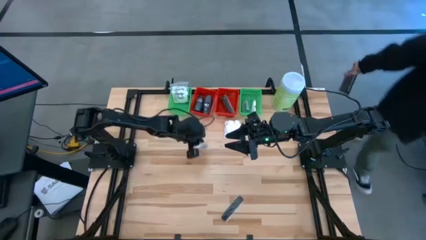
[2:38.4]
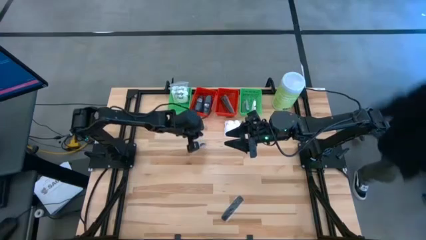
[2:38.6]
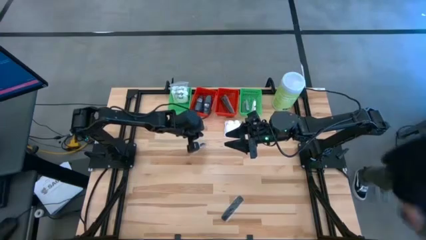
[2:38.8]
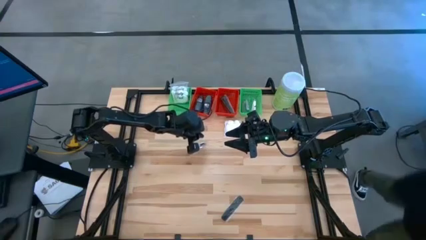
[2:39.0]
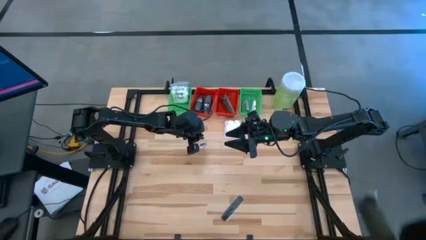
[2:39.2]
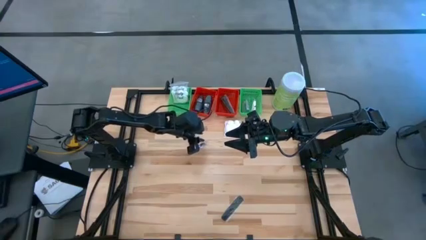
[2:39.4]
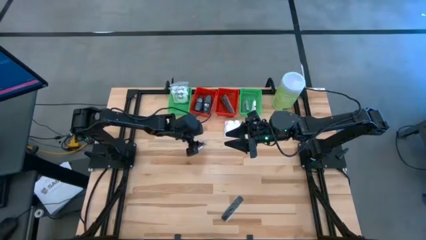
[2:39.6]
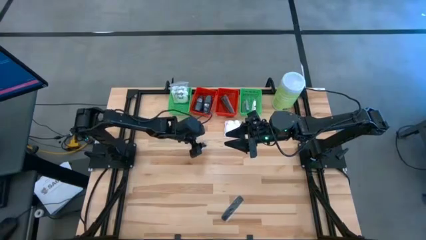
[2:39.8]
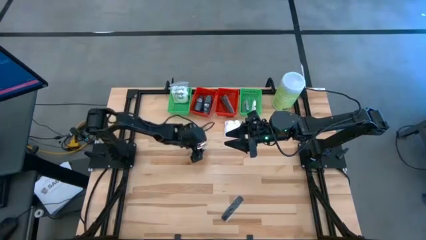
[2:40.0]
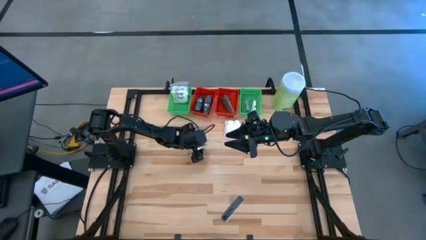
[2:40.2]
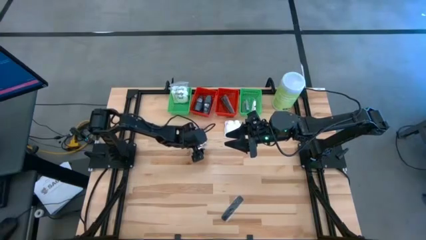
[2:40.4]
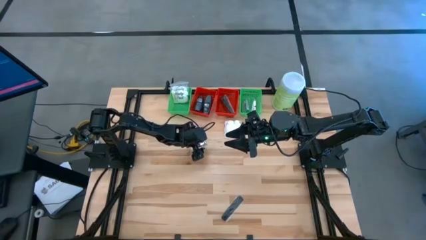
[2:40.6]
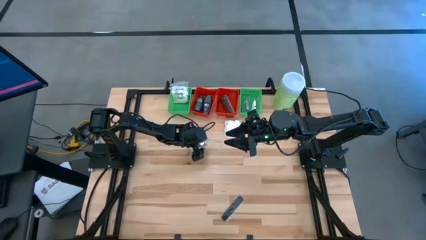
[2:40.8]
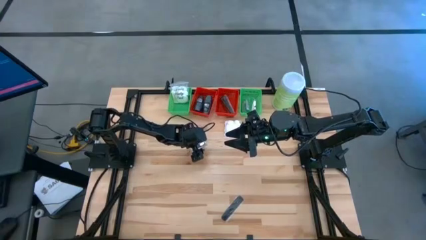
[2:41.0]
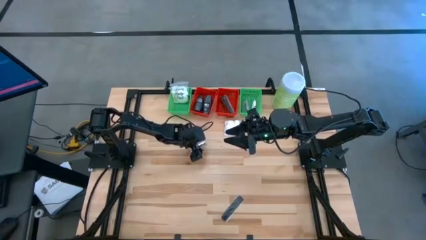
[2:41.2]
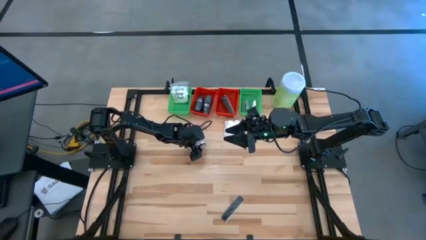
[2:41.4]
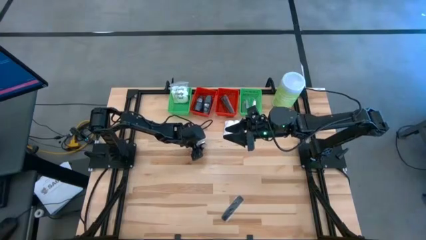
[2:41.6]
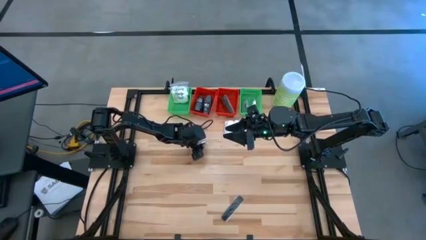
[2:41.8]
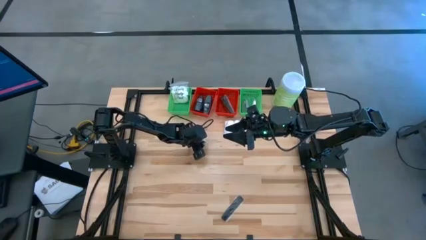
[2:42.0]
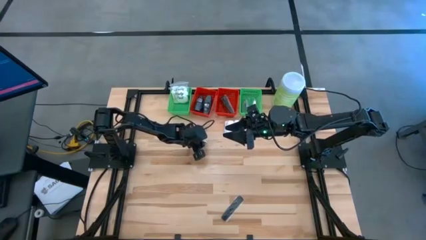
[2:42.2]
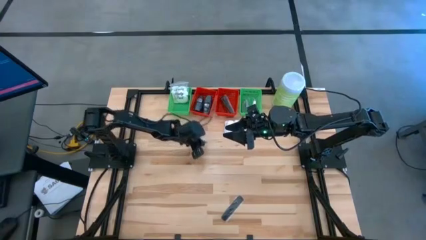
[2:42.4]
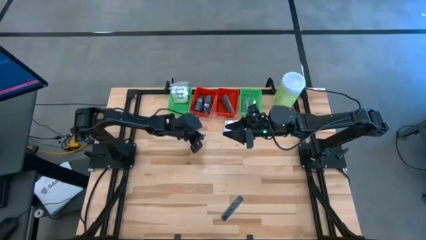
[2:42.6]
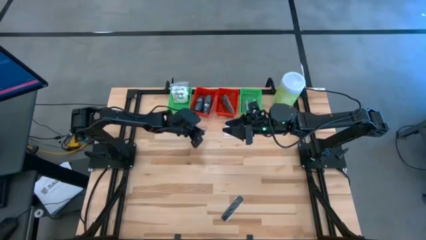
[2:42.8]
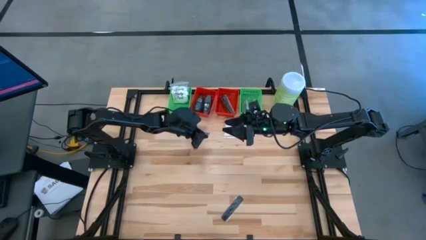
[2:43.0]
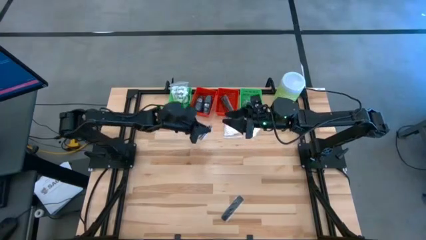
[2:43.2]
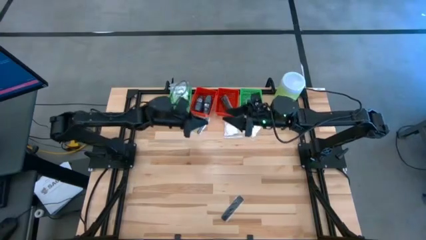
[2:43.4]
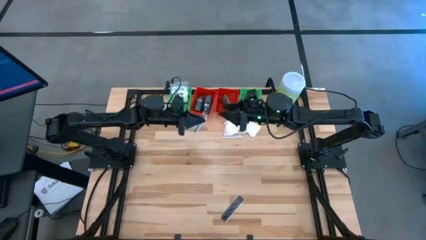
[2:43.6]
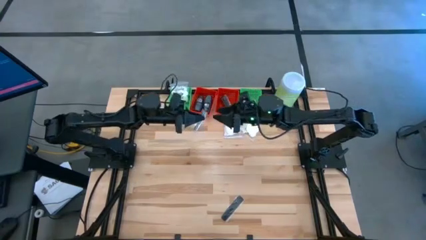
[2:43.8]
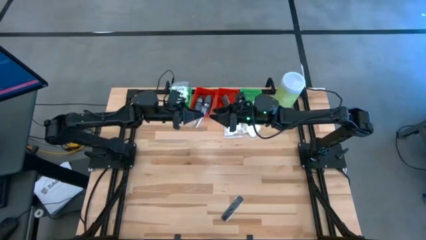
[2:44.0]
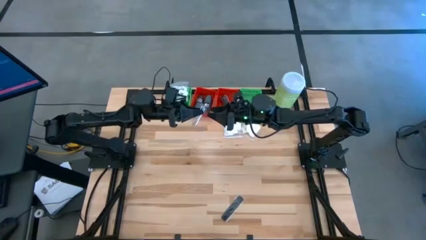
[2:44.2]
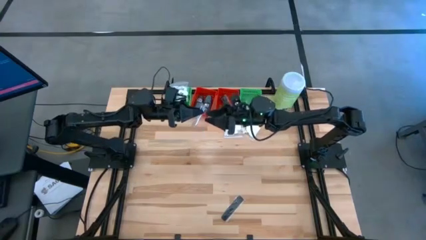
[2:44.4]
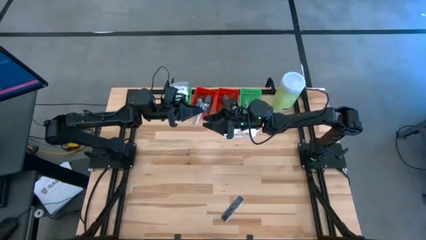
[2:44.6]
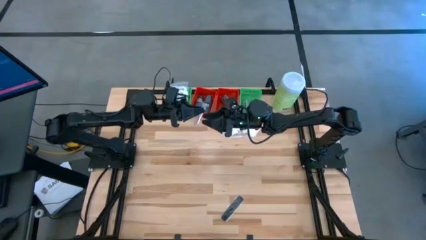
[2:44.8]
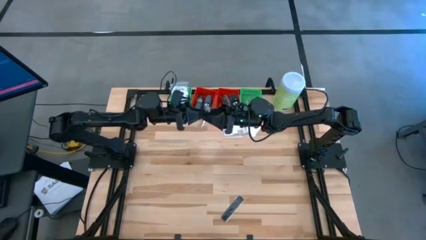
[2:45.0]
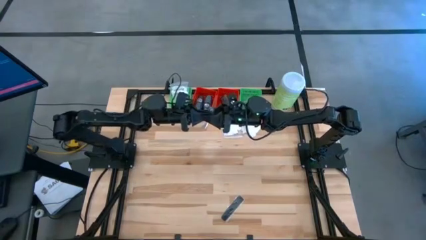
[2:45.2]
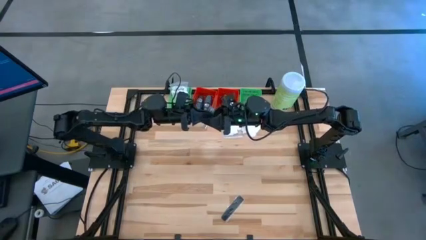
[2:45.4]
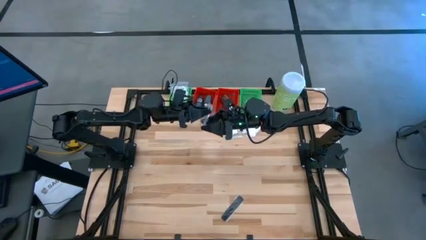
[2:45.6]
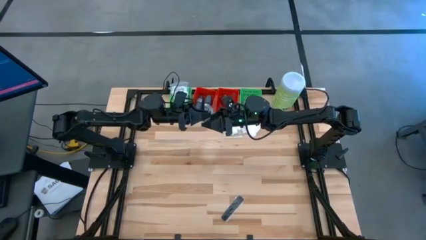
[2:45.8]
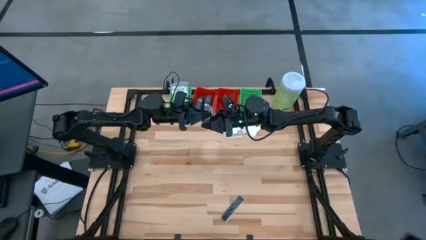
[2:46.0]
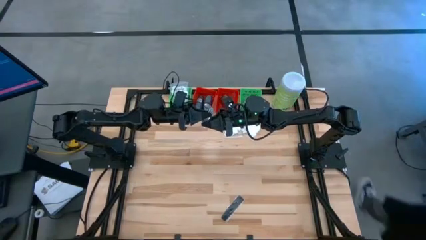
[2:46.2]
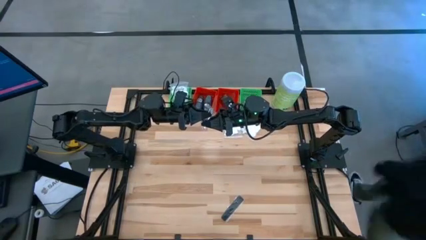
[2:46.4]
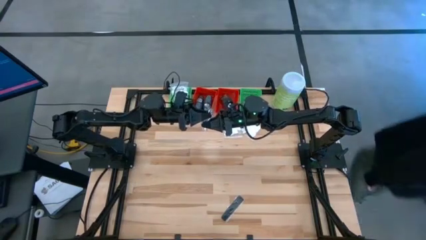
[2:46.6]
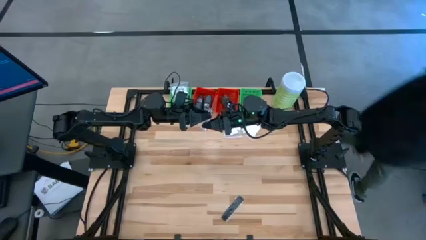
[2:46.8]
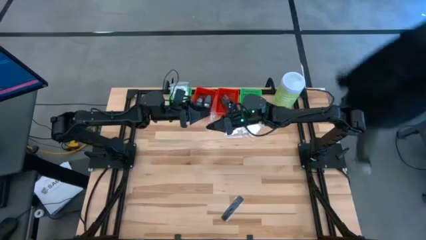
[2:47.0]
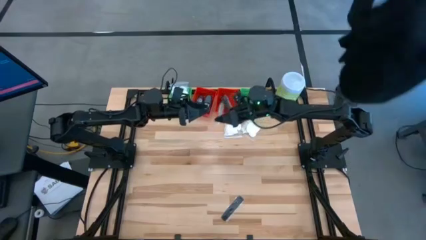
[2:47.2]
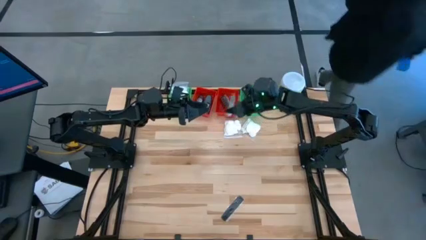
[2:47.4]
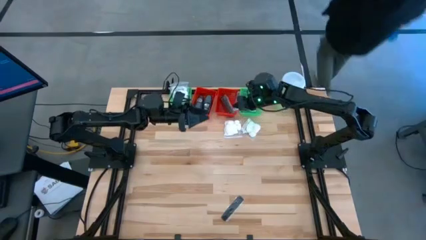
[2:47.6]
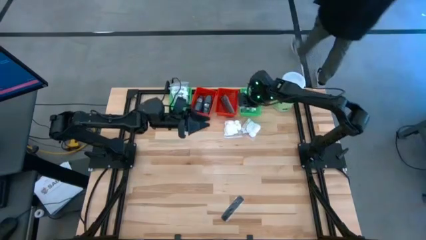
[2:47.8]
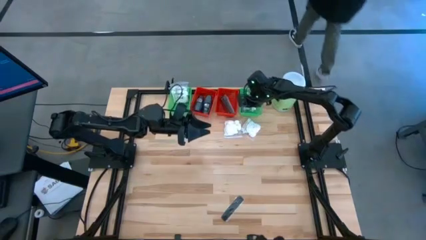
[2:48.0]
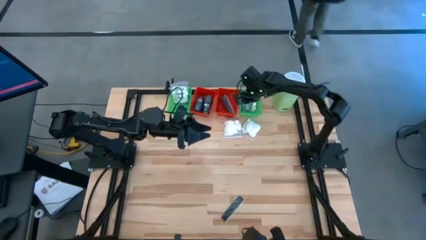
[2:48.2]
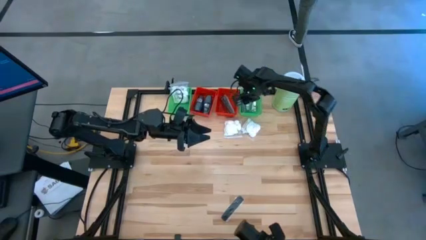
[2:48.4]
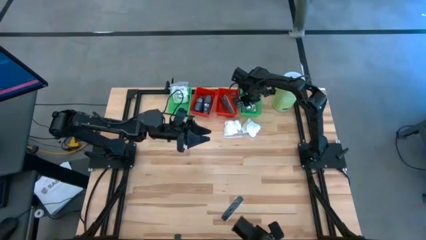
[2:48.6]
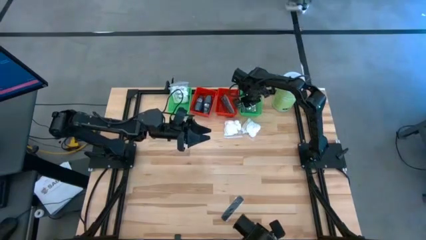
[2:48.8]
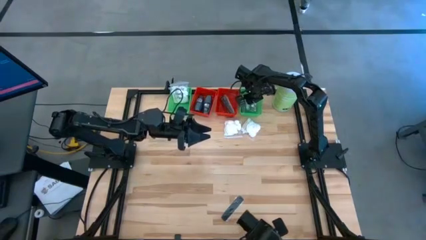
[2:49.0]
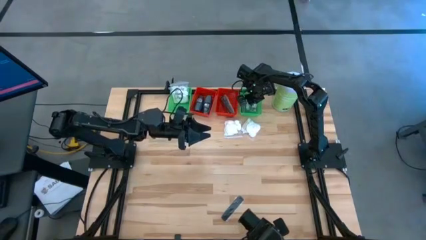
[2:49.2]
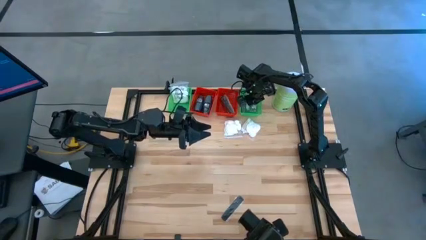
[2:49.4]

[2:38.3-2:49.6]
Task: Pick & Place Travel size toiletries
Put the nail cutter into the right green basket

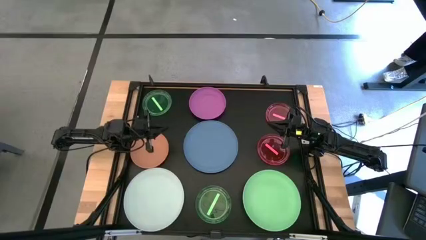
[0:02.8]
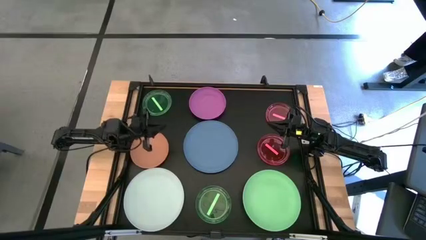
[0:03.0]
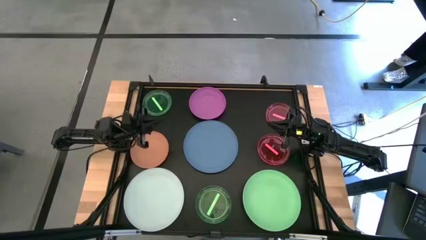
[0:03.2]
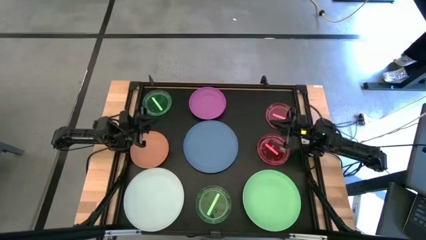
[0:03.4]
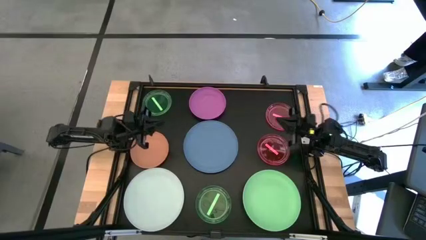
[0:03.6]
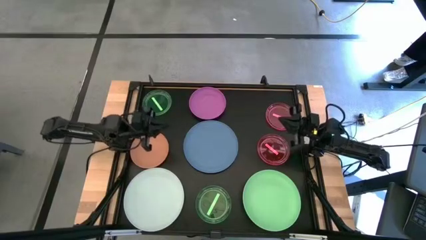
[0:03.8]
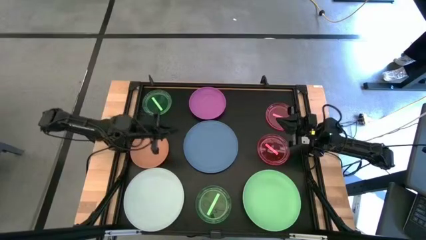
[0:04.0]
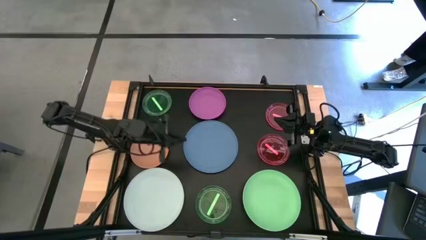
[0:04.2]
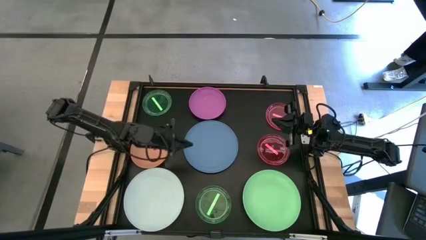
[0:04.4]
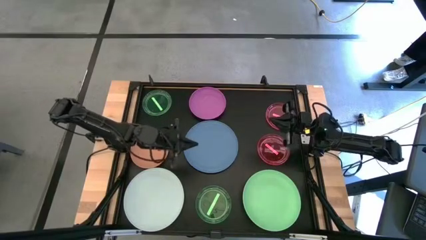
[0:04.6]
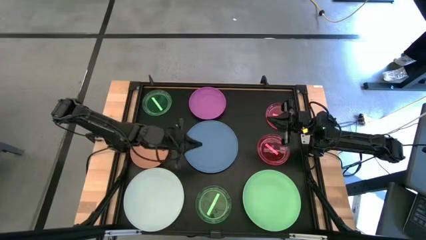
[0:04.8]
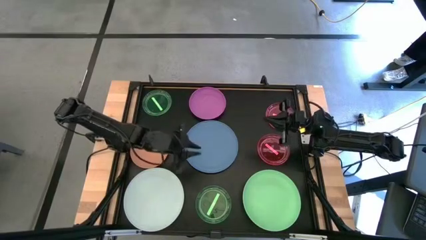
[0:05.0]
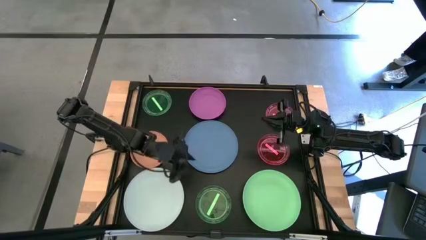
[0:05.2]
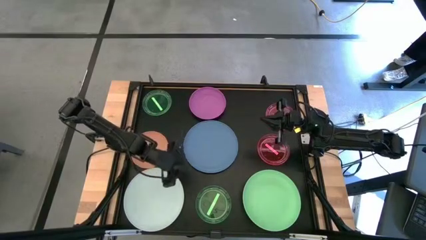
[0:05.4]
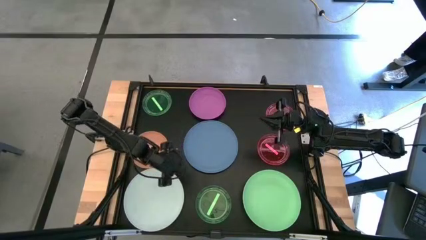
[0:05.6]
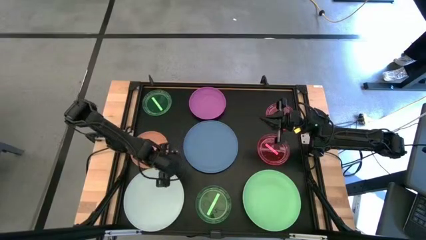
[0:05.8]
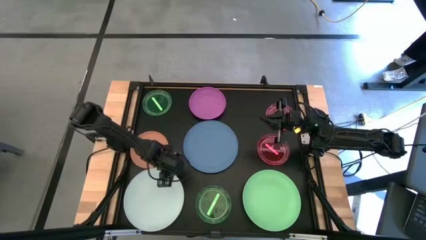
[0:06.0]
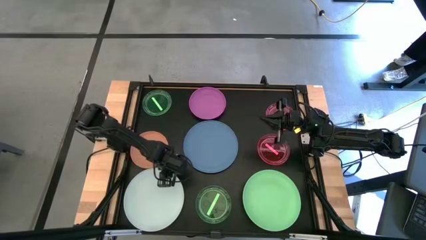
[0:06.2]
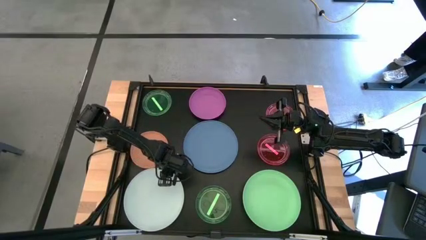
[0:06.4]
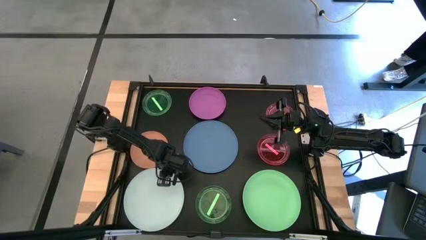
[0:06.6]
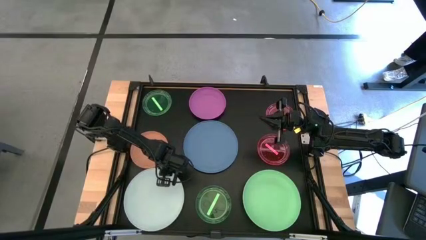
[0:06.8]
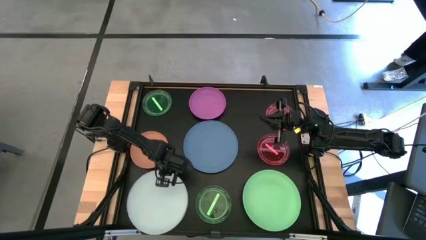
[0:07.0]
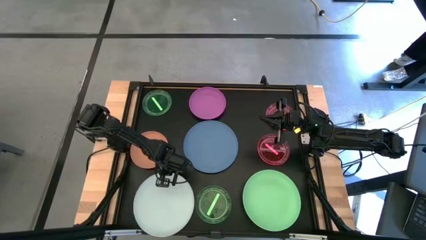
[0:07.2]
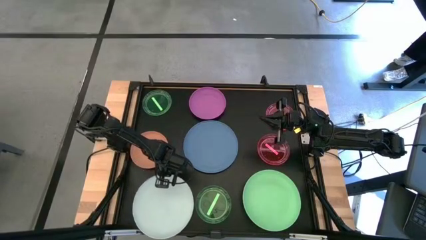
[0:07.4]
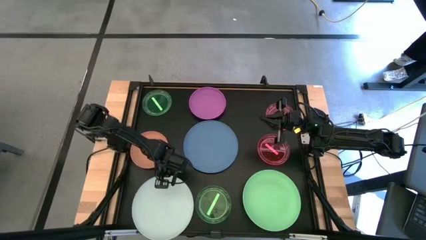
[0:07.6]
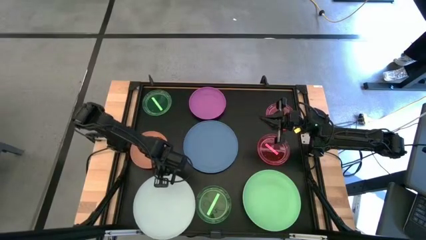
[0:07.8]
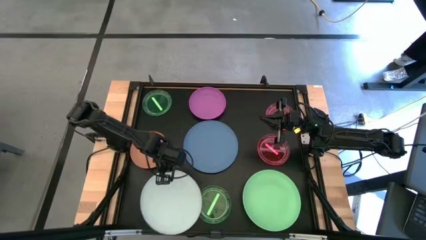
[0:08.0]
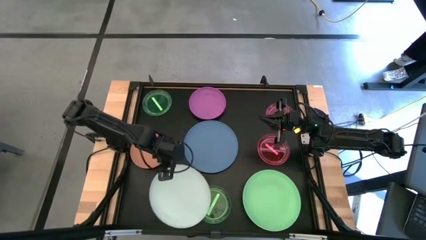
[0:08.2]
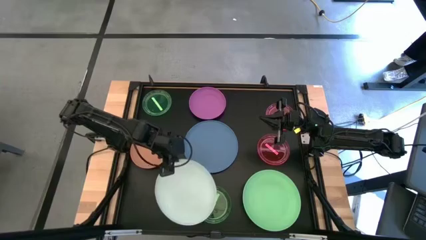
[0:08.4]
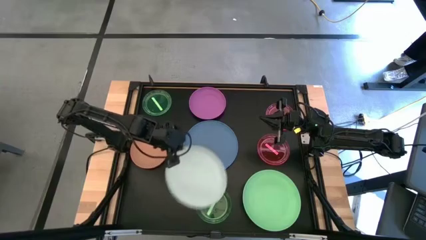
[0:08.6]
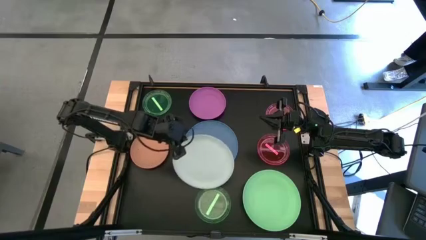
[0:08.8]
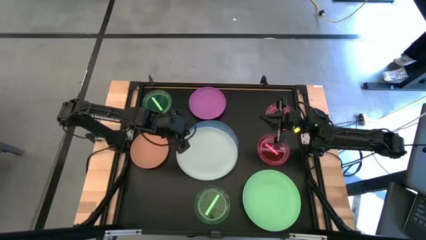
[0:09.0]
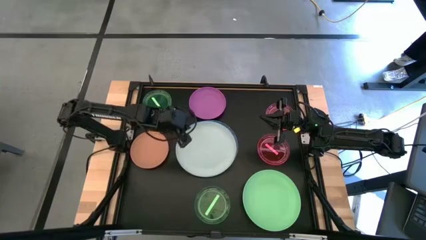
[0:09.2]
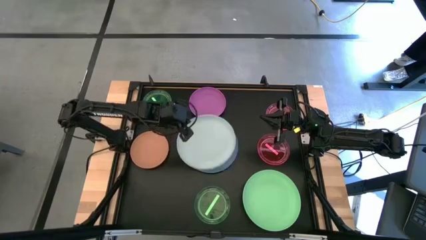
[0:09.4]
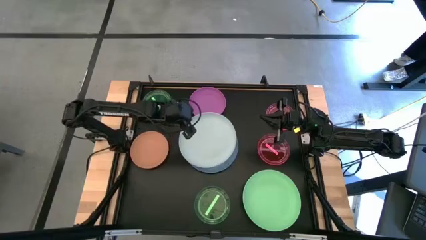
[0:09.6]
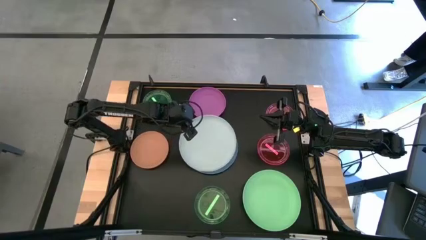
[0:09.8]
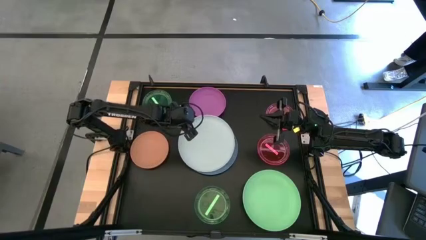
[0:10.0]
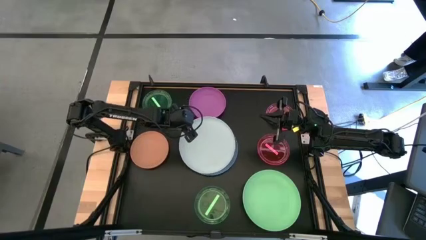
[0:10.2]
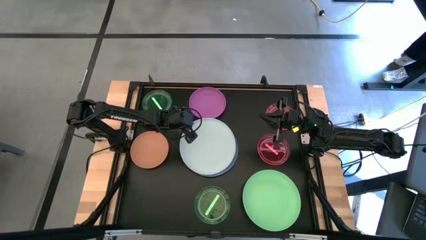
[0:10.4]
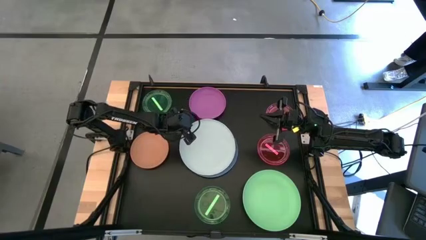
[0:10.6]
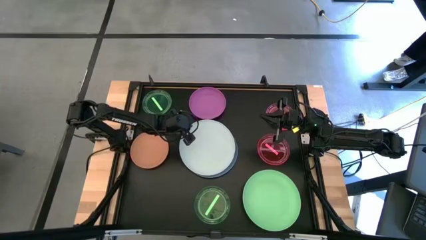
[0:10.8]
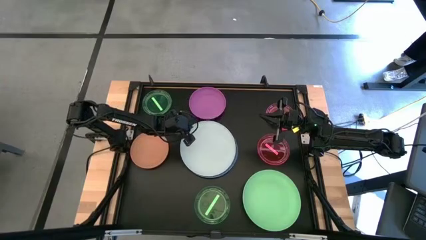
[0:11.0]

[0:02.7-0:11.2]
Task: Stack plastic plates
Stack the white plate on top of the blue plate
